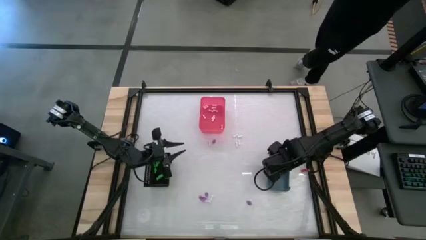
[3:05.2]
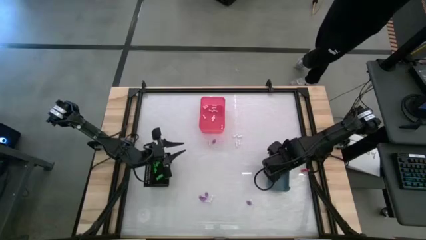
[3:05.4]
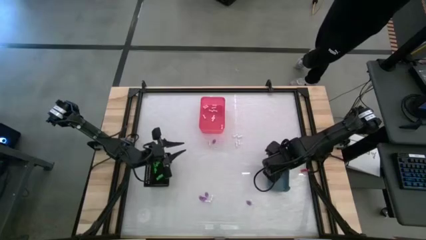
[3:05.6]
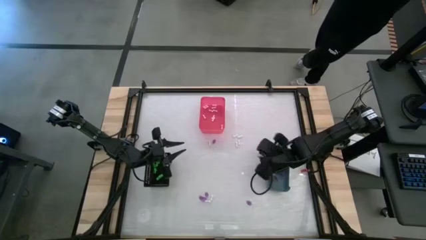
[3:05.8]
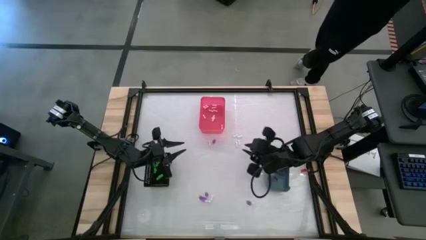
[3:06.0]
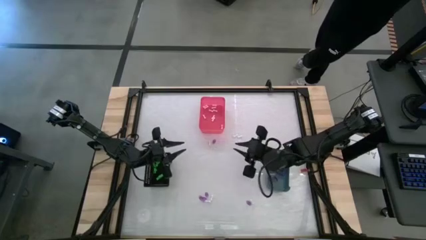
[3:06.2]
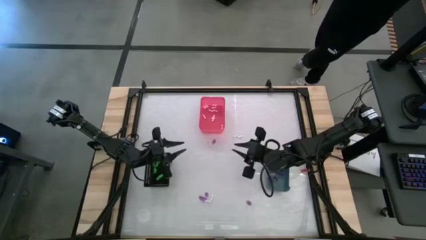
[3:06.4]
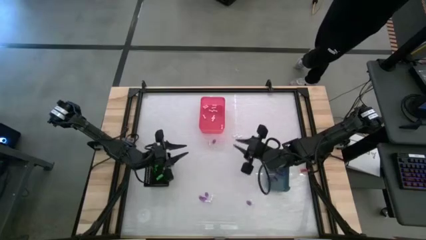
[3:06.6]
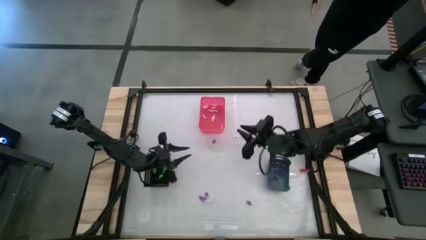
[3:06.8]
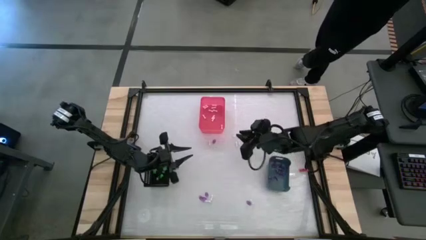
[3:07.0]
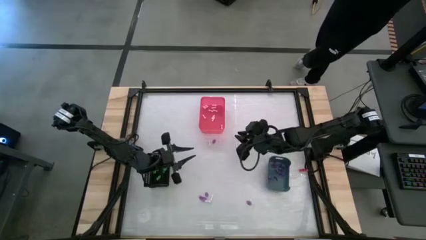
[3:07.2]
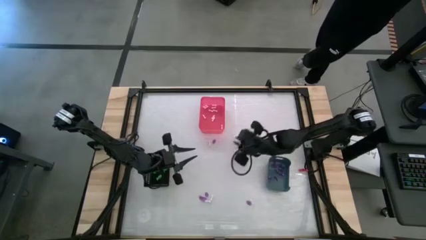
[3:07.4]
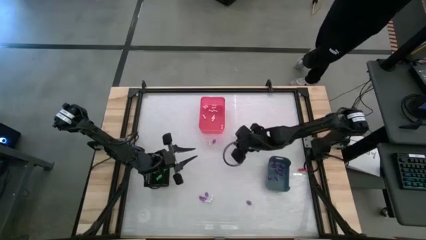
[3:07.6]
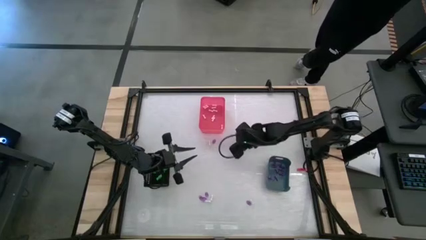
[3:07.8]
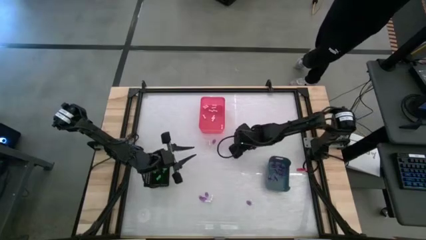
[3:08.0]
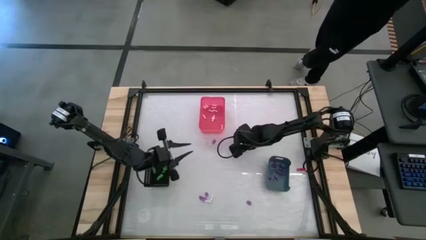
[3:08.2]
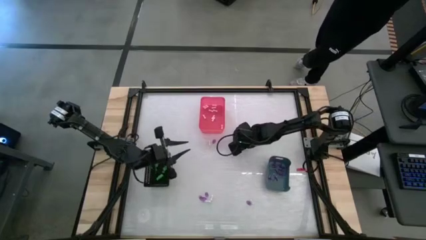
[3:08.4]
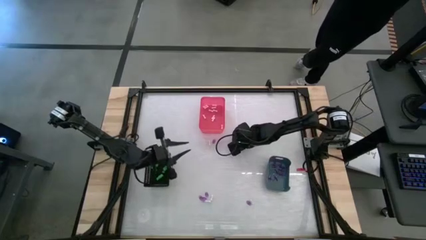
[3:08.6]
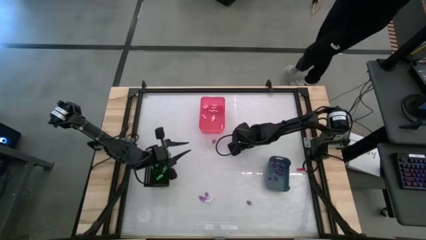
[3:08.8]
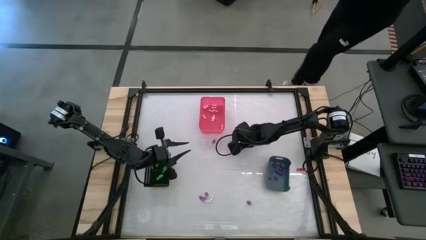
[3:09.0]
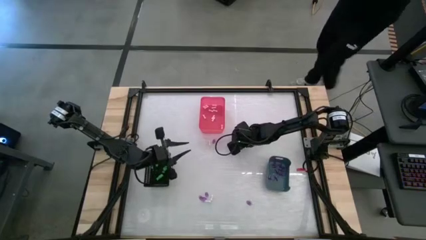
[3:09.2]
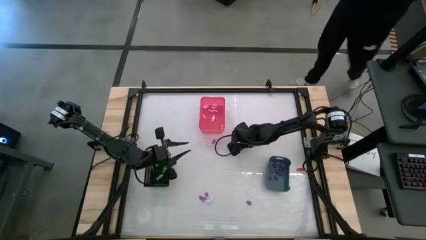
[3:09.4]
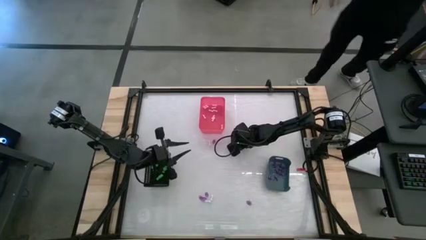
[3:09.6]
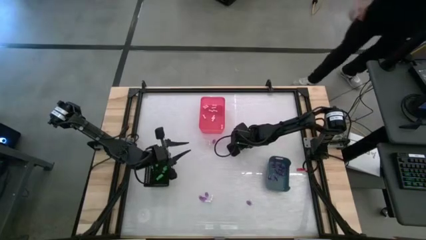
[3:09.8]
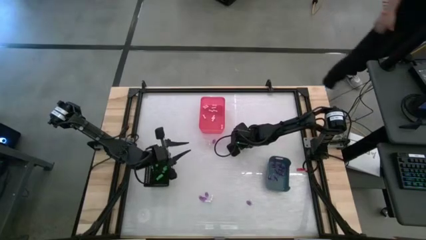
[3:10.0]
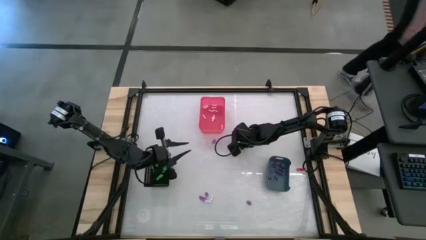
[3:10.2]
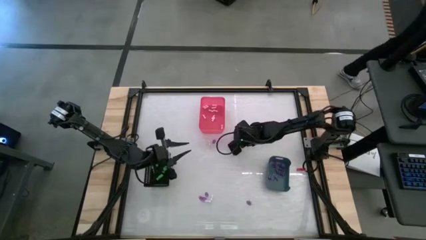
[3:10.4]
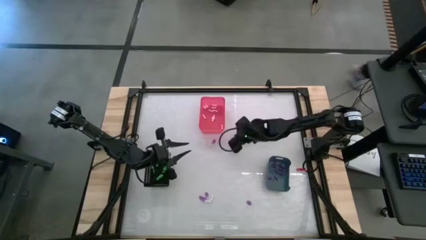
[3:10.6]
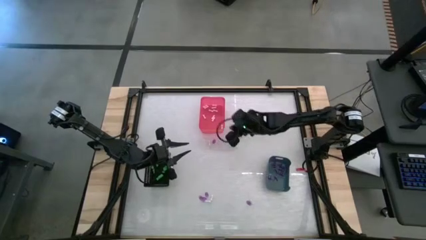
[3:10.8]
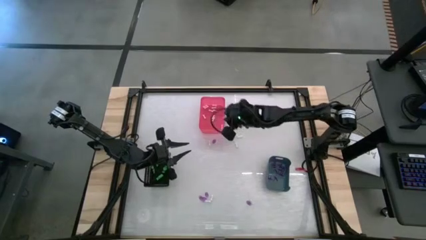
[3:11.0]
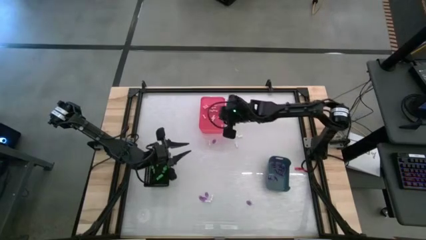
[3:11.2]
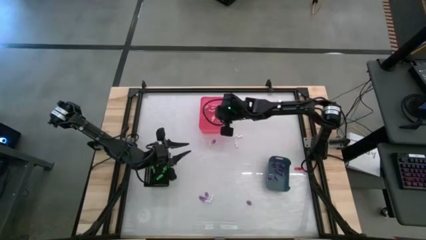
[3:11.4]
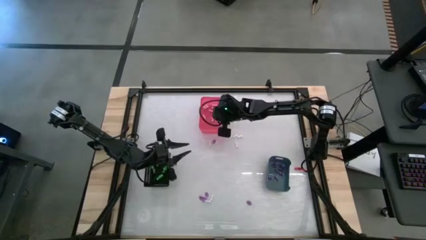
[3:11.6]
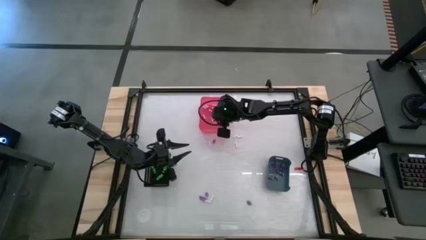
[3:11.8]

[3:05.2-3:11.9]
Task: Sort Halloween decoration
Put the bone toy into the red bin

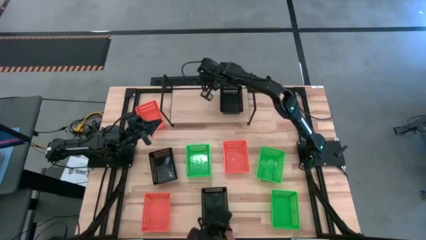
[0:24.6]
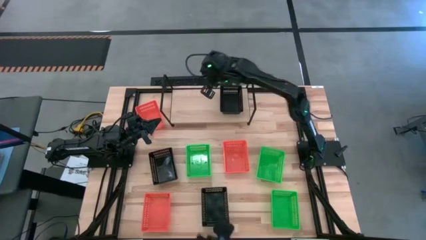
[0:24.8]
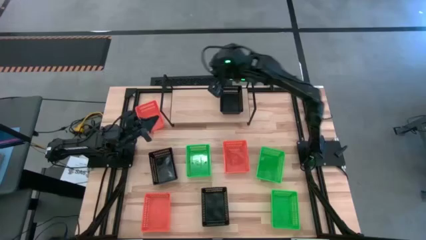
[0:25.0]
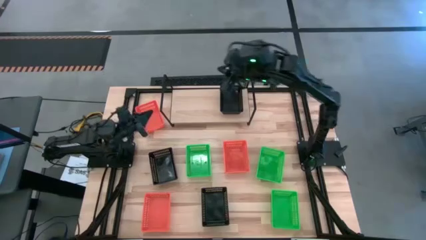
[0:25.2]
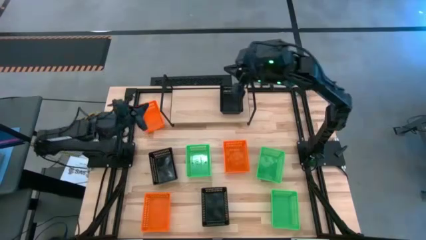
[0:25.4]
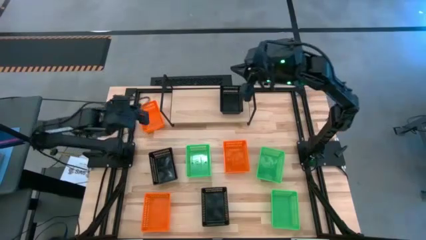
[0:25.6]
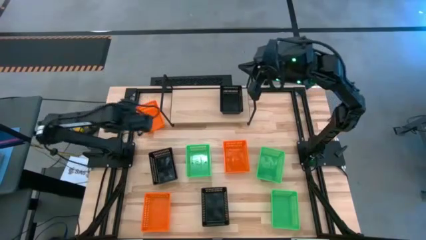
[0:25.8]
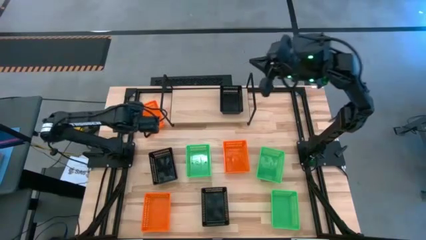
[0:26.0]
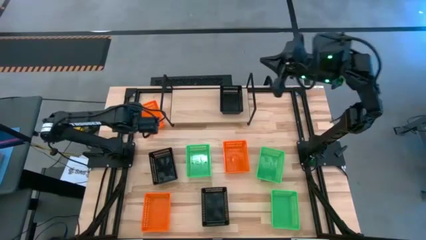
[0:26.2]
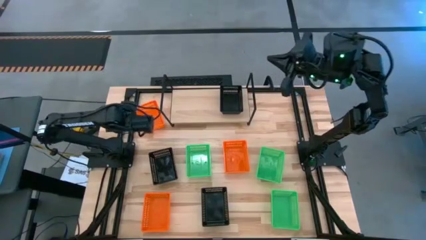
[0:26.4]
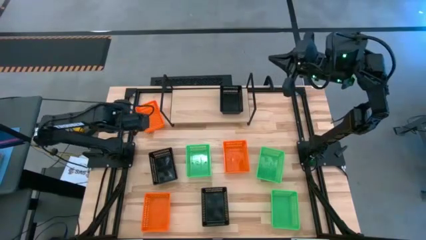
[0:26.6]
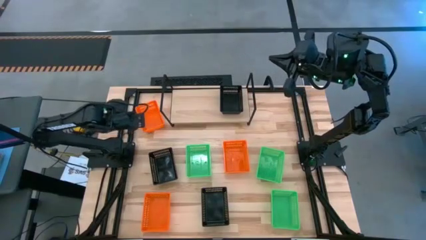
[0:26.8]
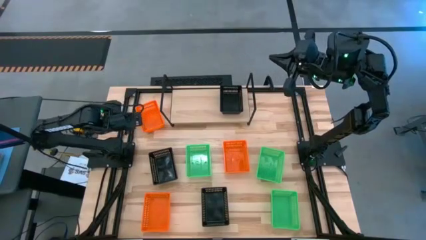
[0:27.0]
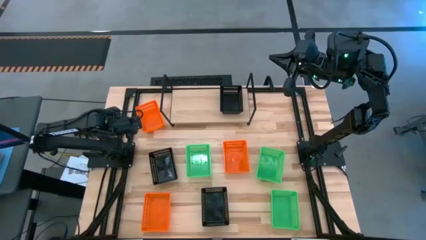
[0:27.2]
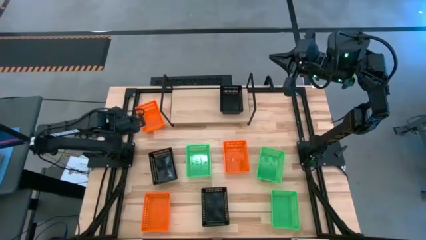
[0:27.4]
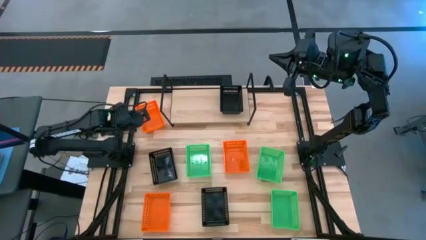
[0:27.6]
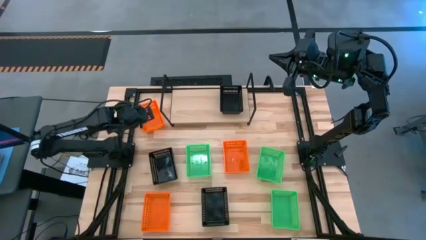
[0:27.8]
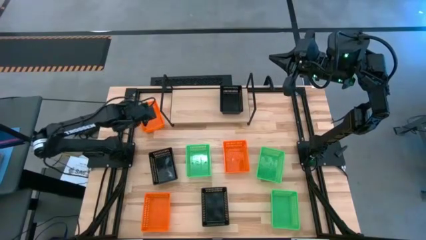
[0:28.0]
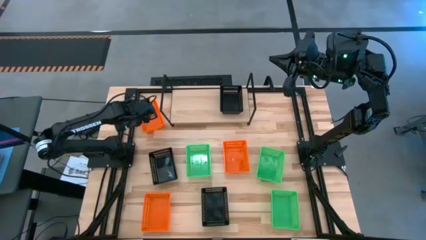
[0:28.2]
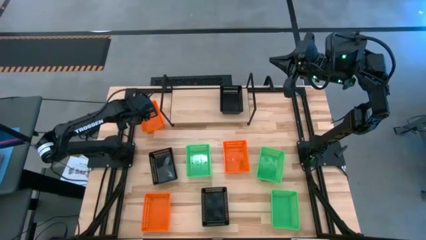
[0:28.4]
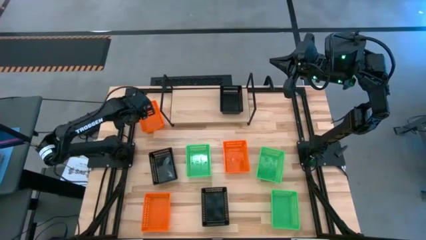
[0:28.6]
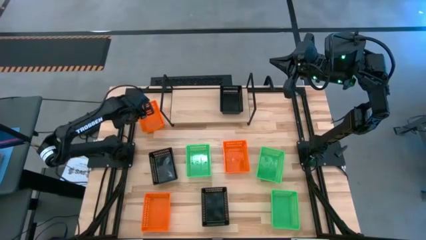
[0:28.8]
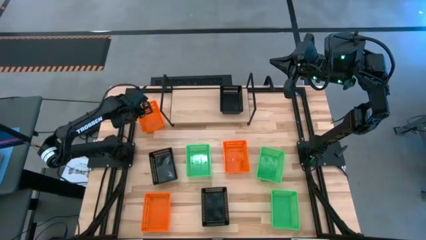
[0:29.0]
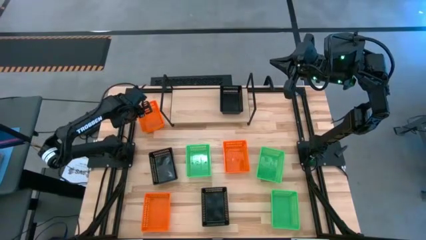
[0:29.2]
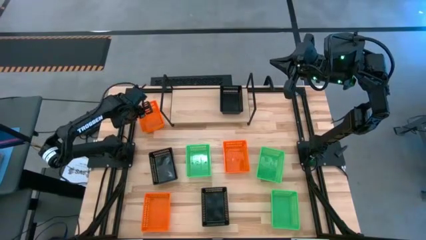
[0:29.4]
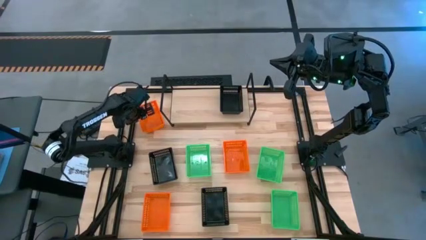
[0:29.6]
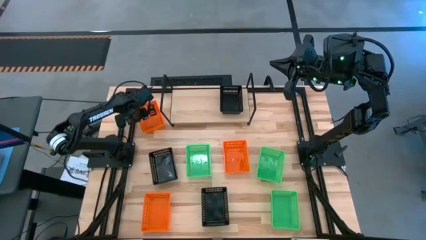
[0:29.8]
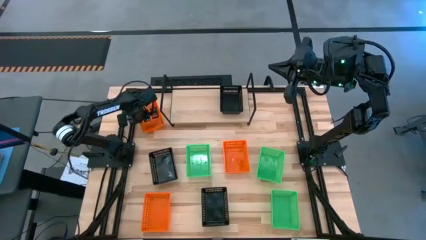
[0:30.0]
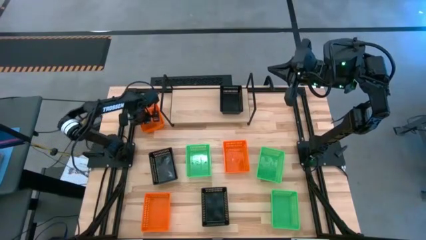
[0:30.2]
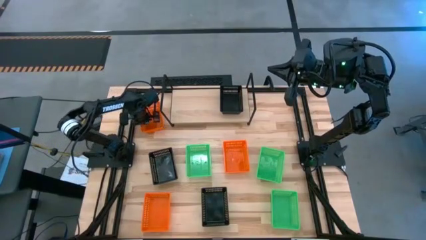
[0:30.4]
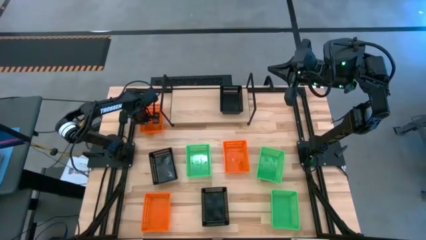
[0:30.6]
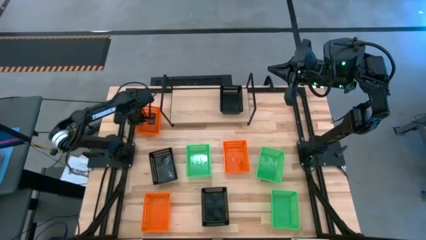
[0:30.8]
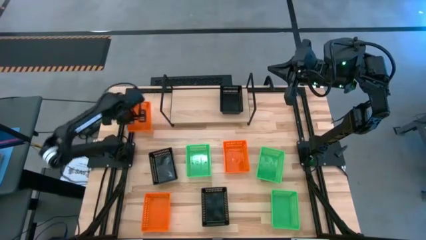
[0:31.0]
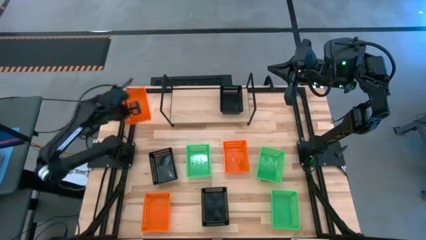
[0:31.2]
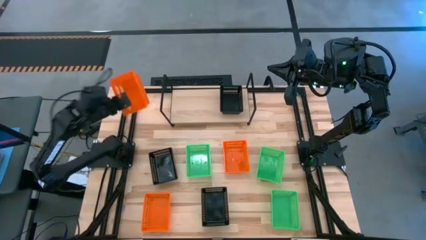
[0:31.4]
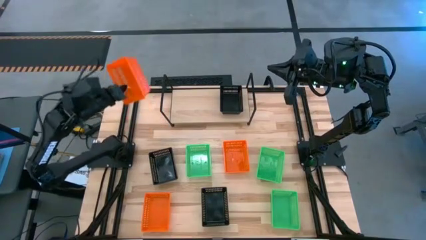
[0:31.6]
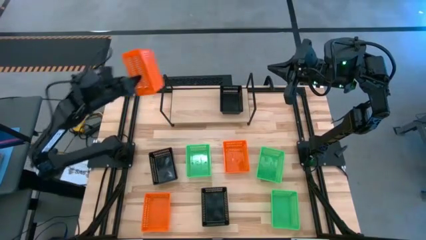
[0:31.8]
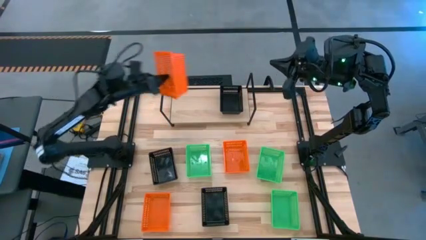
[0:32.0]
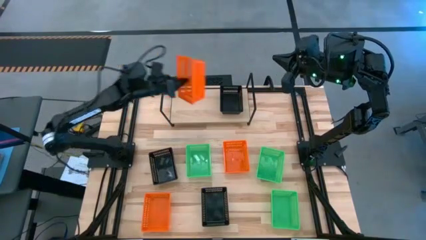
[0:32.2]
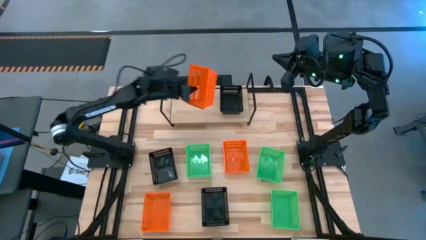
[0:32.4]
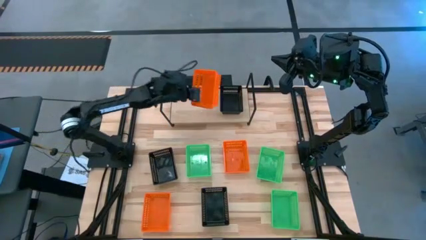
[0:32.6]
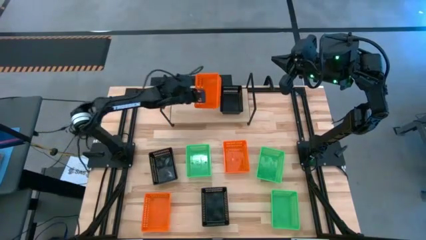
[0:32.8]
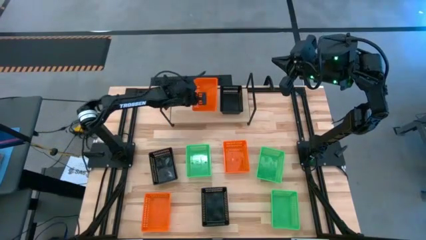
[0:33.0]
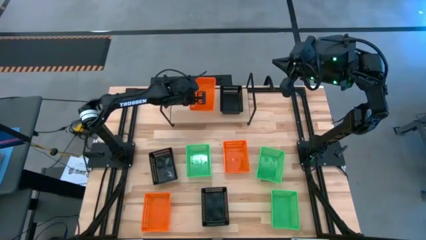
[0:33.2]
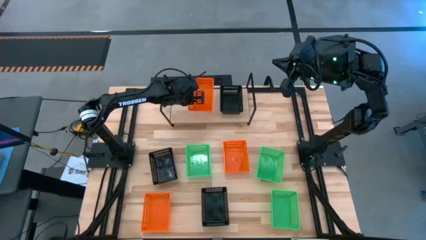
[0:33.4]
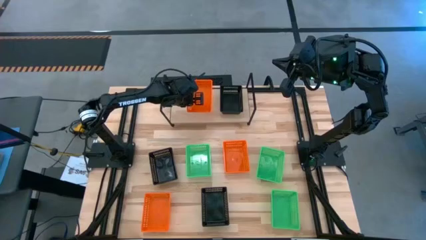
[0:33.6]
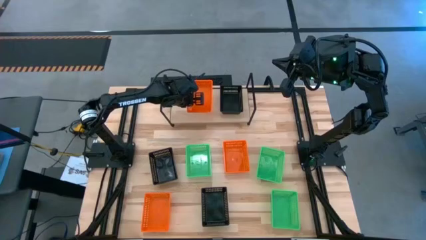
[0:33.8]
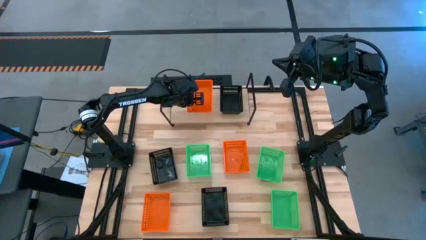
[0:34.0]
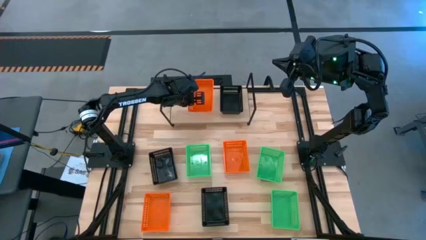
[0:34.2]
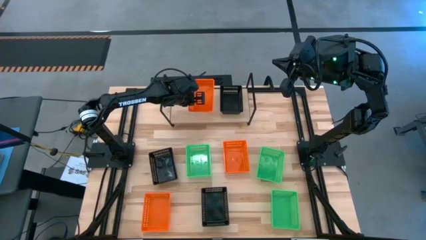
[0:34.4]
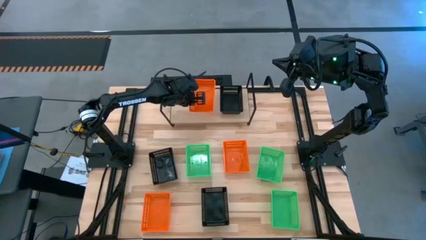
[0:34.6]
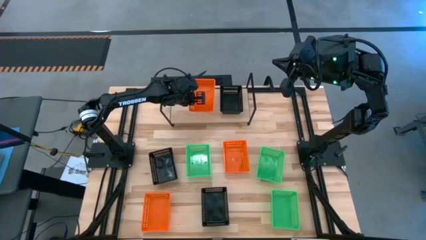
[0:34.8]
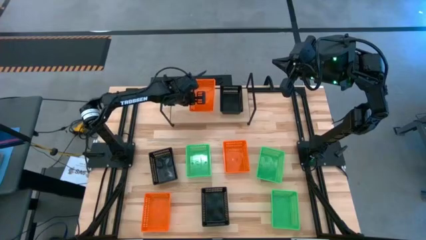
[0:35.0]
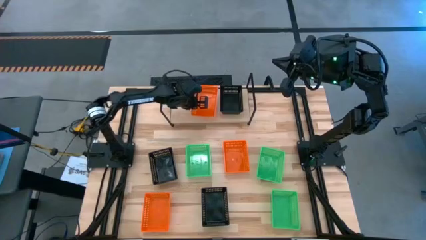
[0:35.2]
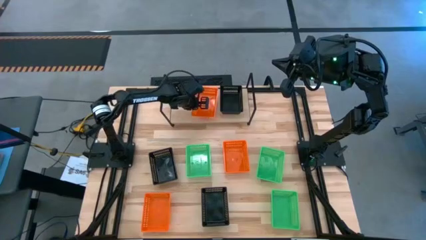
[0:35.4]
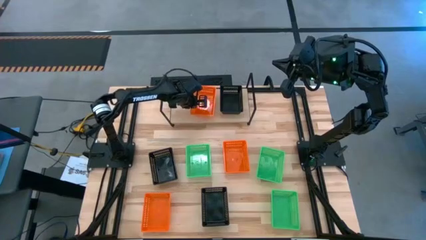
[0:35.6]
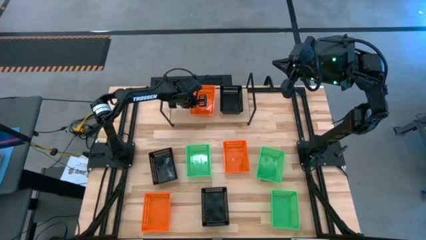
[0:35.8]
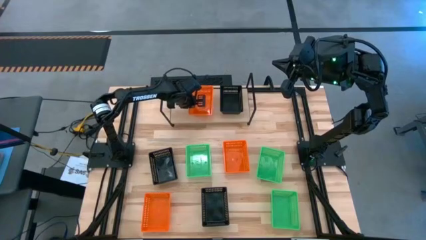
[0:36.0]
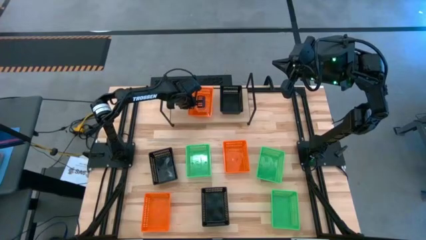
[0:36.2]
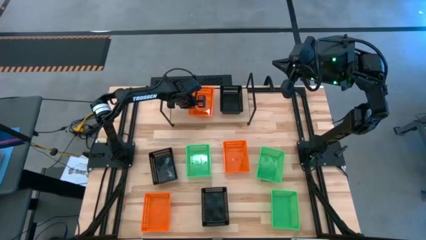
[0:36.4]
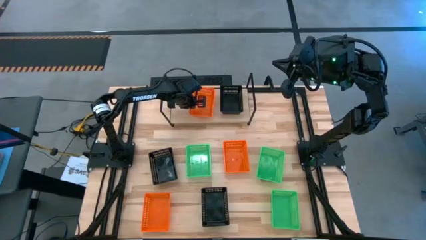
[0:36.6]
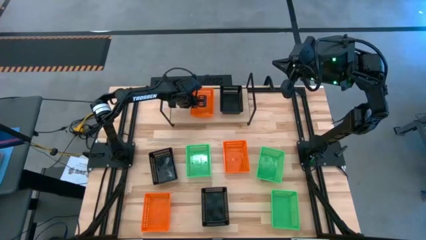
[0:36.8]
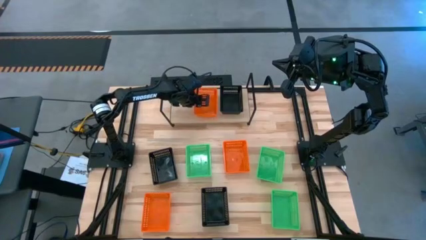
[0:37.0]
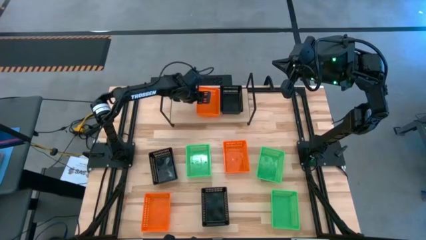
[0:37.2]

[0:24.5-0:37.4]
Task: Stack baskets on shelf by color
Put the top orange bin on the shelf
